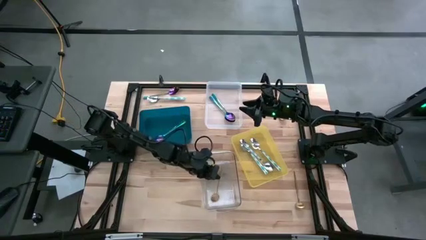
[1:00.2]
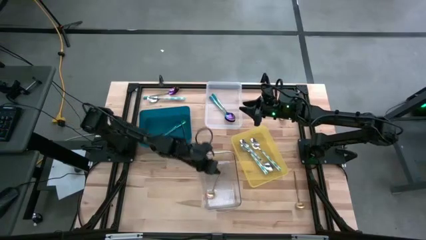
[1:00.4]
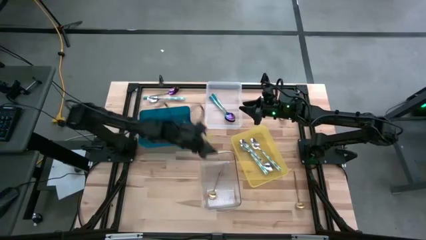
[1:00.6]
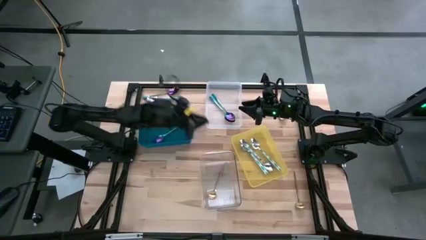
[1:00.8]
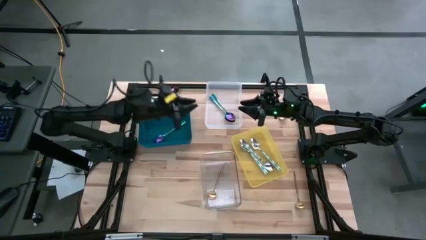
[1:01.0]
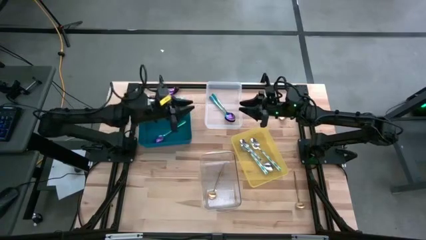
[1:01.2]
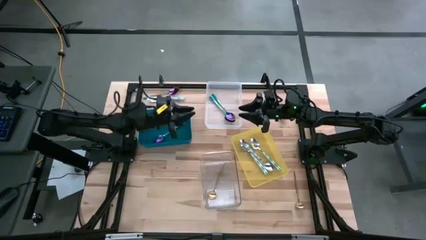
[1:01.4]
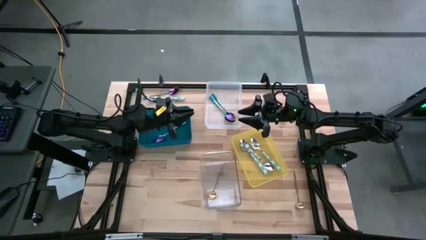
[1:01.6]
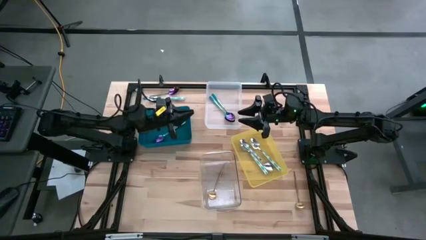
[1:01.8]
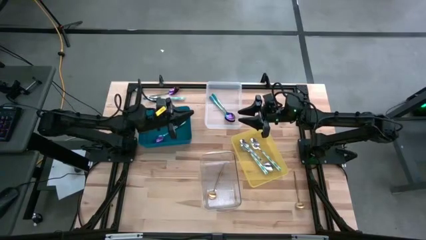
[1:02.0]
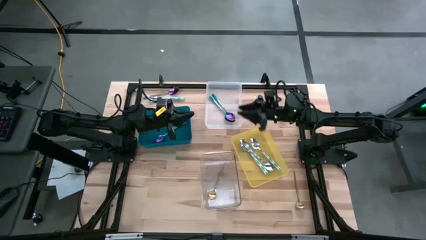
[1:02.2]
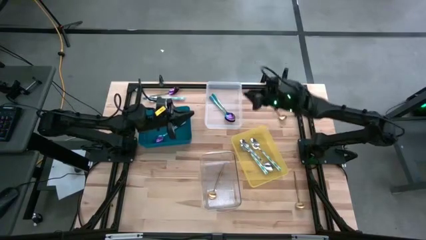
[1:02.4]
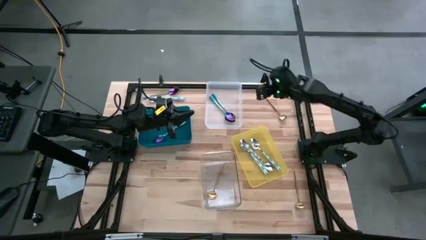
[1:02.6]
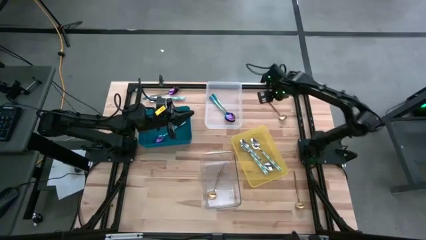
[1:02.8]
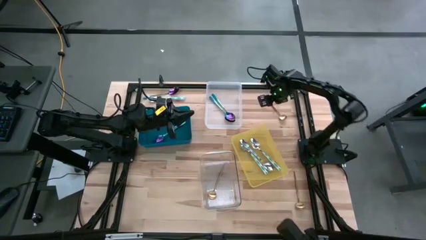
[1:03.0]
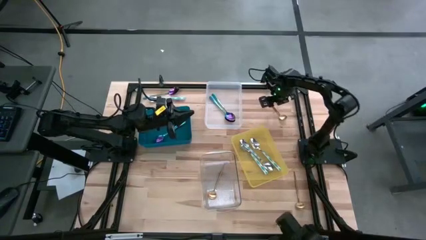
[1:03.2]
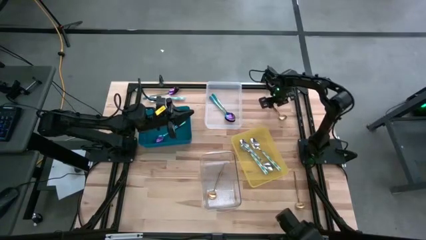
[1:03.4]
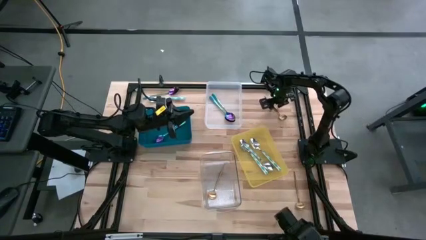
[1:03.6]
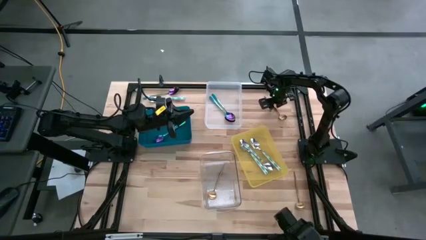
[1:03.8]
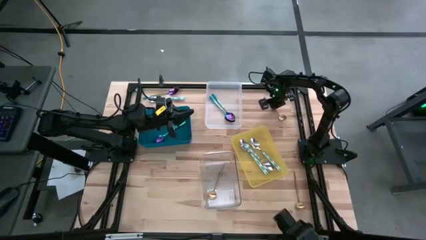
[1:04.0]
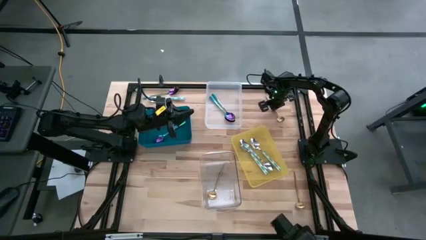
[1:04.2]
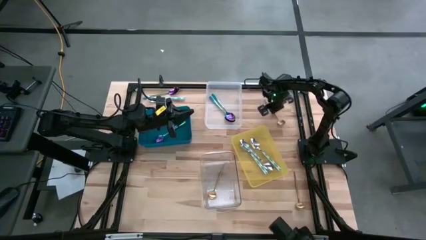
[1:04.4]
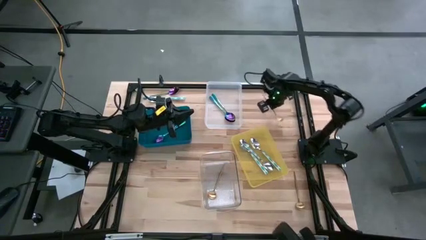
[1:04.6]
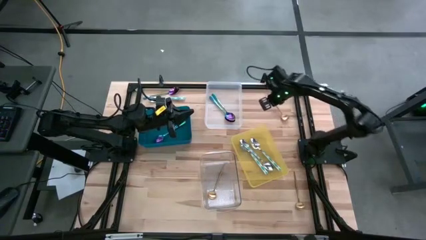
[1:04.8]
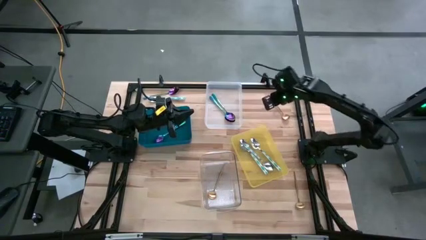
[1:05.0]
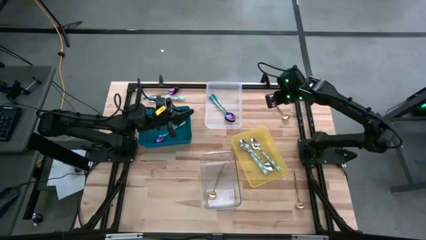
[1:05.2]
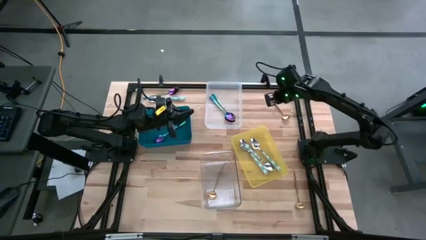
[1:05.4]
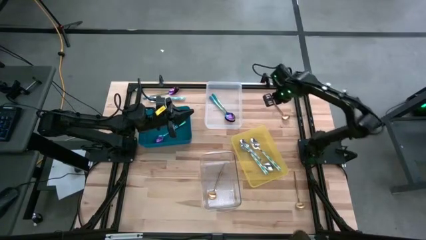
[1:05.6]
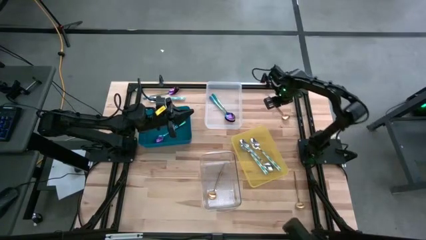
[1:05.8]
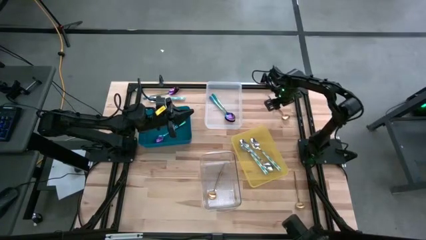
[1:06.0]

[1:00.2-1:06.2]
Task: Sort silverware by color (type)
Put the gold spoon into the transparent bin

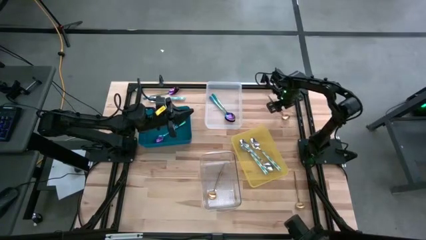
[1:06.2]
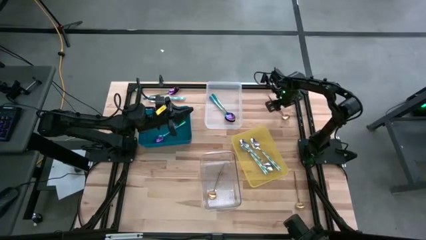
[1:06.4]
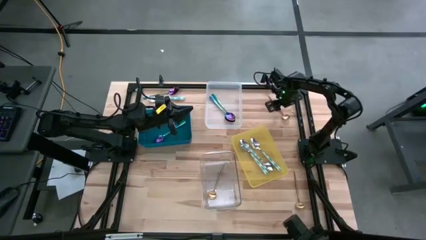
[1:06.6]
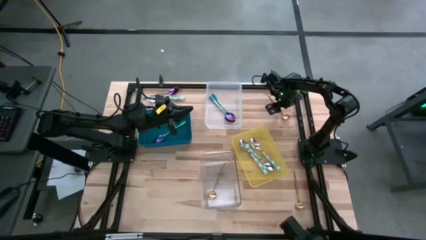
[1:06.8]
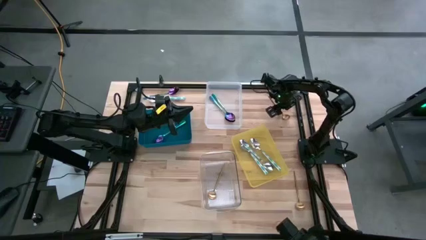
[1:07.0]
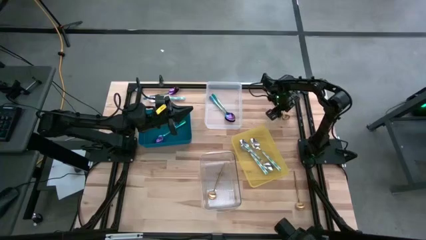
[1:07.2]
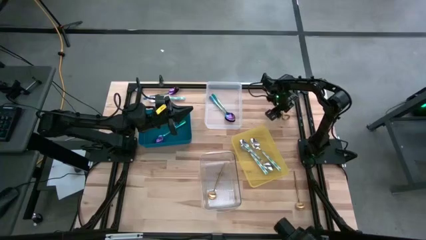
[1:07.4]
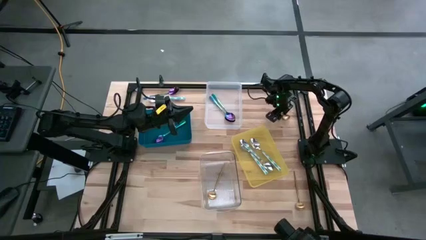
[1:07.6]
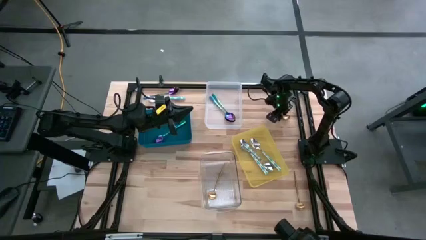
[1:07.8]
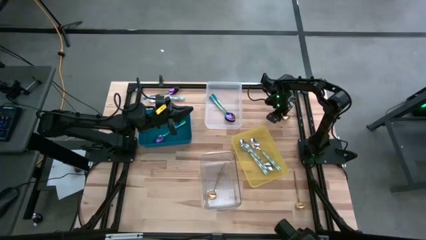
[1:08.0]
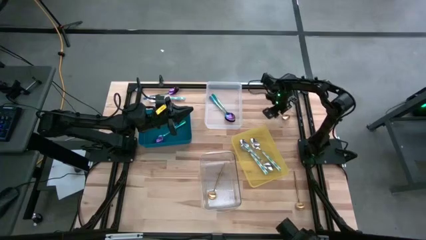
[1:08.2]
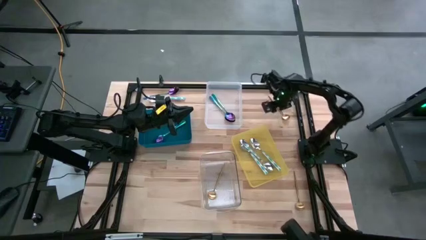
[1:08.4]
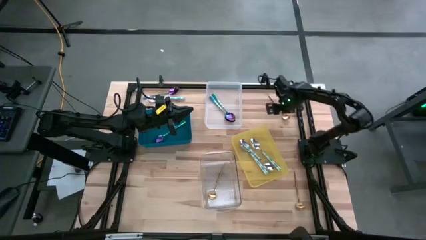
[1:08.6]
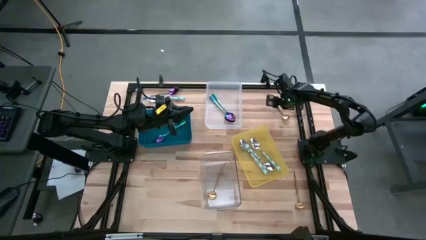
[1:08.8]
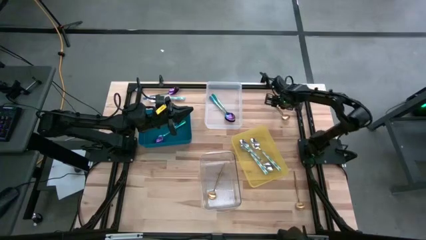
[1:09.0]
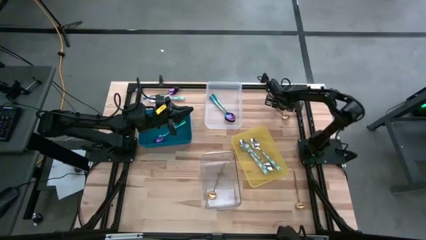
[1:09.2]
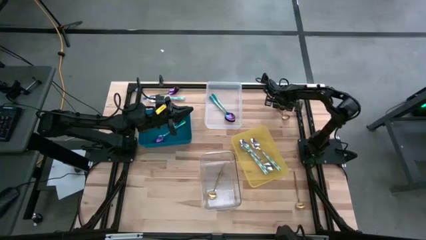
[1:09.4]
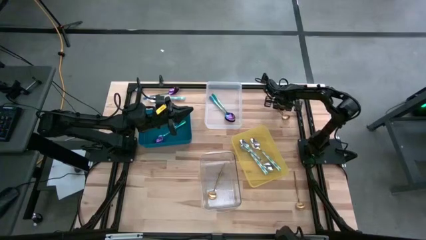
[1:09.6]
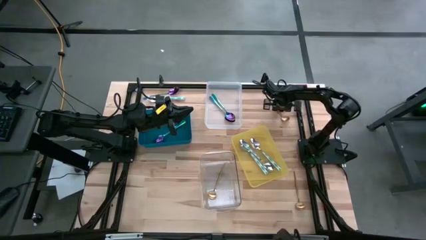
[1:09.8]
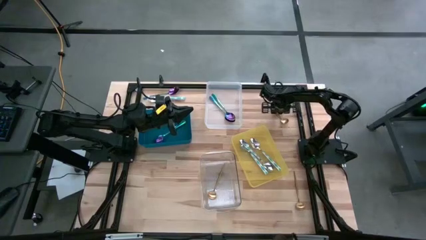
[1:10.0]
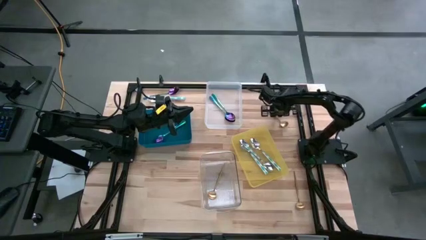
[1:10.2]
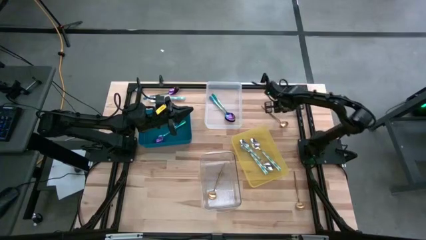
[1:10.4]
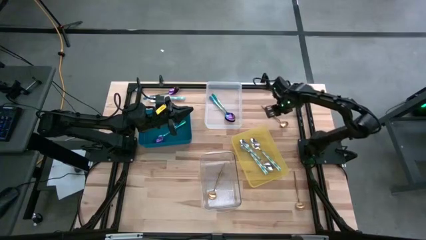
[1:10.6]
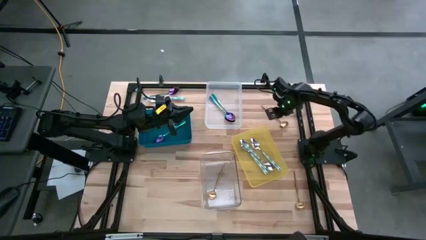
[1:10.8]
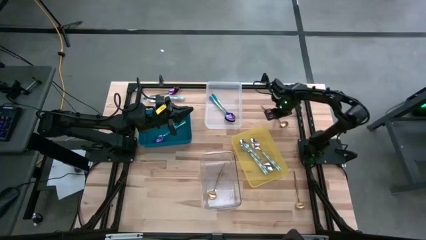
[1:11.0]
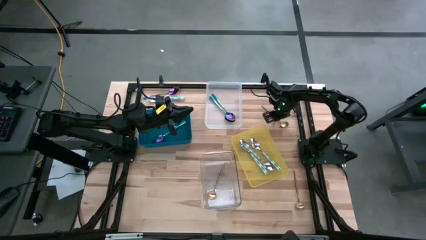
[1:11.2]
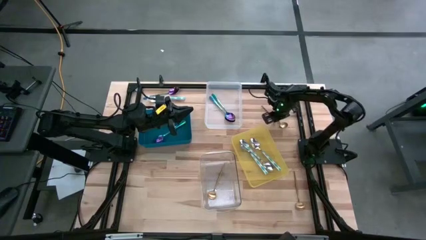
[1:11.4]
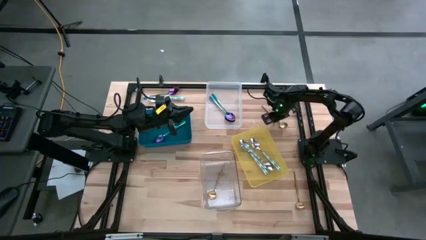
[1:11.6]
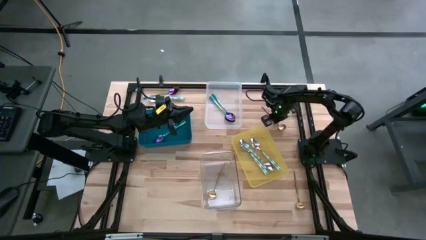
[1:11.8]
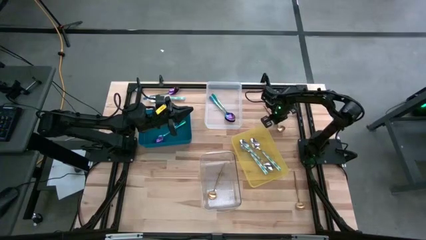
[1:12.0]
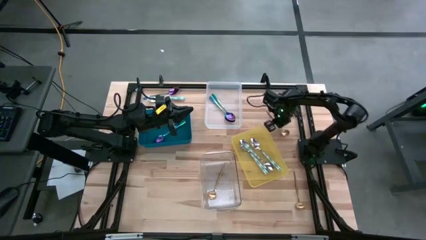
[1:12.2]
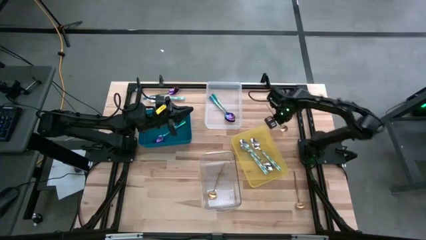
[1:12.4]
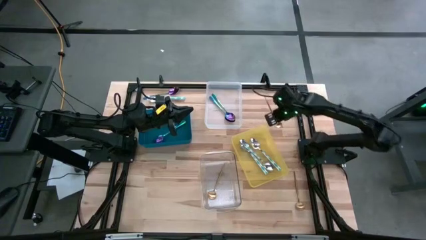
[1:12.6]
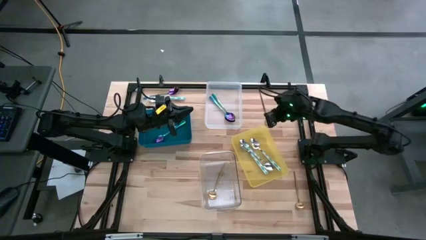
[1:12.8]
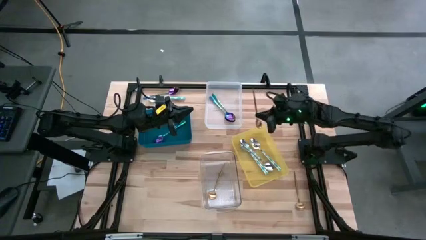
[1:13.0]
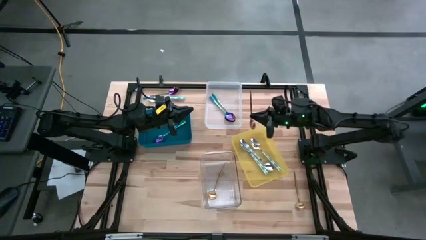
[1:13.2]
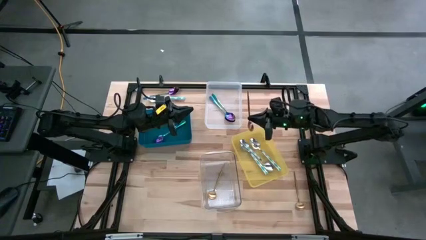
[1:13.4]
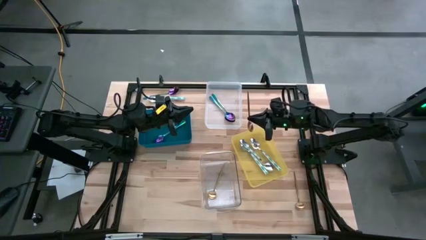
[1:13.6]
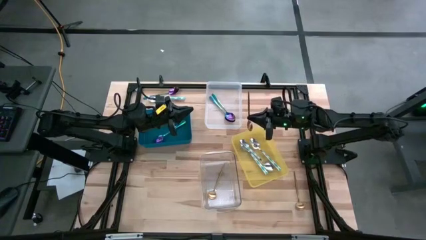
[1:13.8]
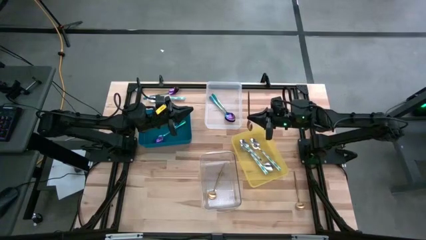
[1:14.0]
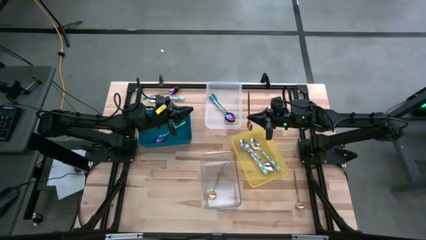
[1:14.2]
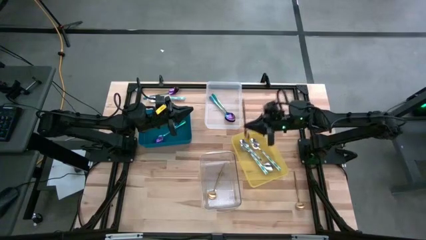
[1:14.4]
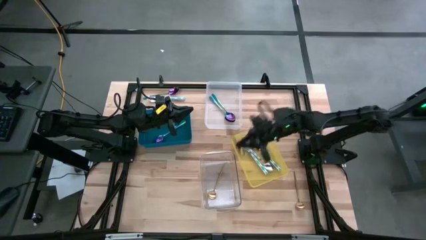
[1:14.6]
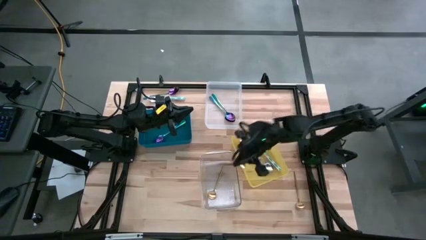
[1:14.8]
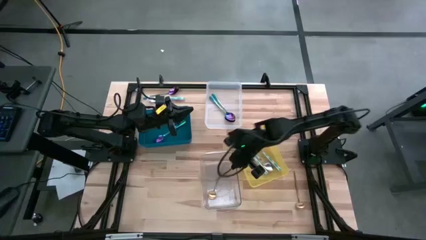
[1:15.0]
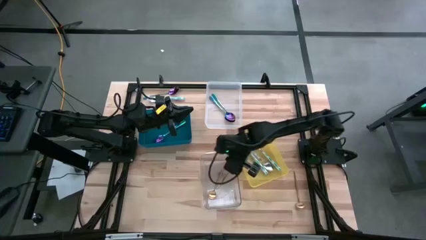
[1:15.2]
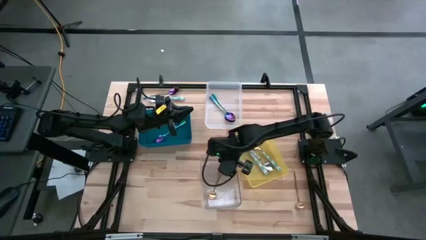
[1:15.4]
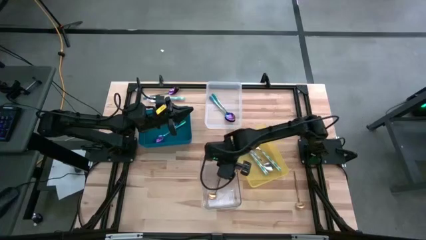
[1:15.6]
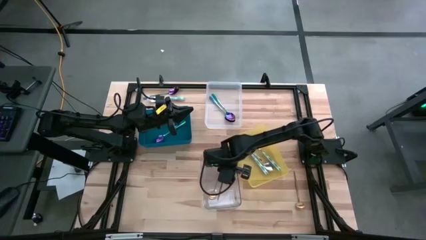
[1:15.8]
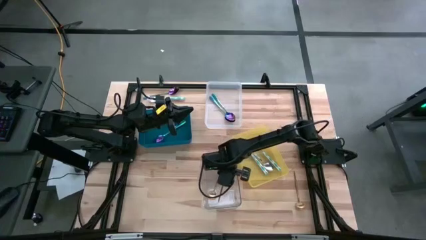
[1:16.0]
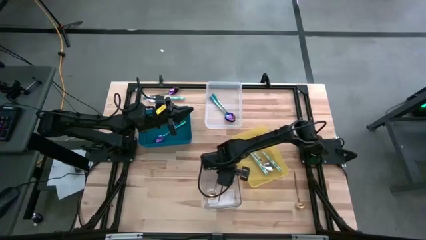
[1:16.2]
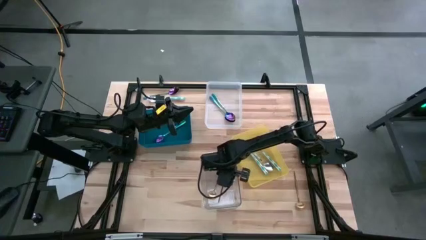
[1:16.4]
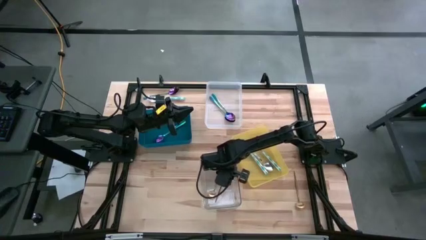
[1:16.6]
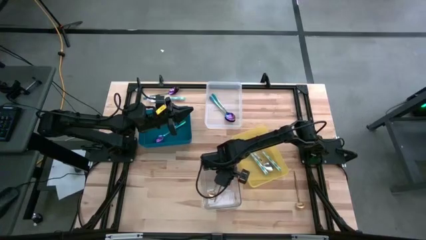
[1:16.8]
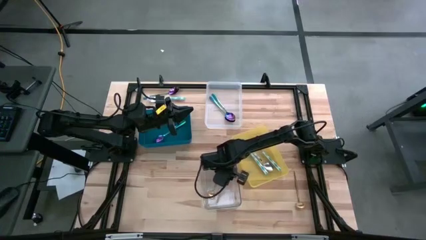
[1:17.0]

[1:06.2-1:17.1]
Put the gold spoon into the transparent bin
